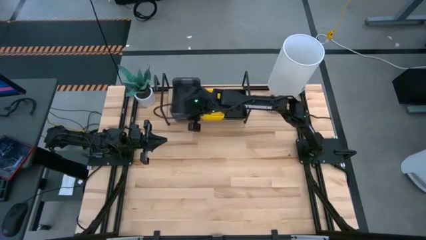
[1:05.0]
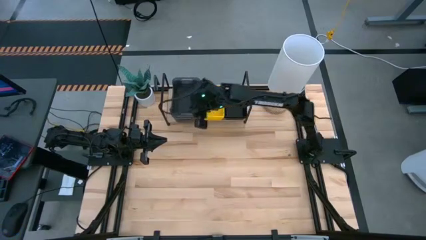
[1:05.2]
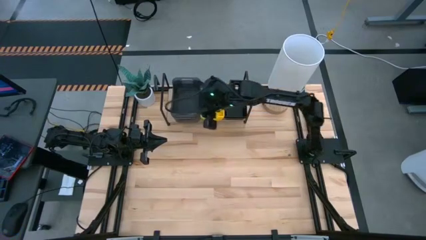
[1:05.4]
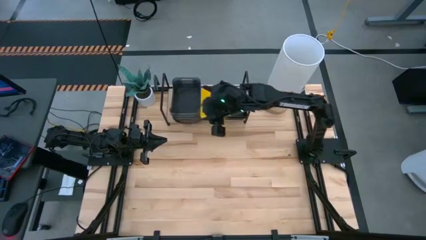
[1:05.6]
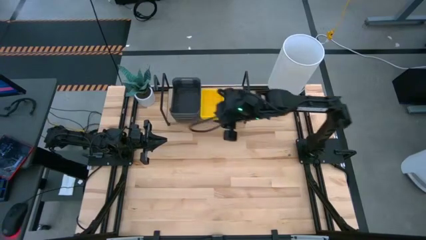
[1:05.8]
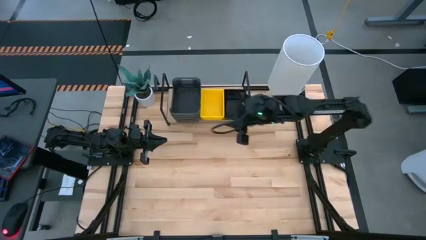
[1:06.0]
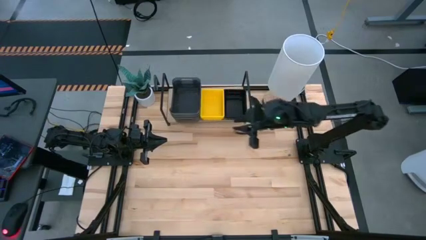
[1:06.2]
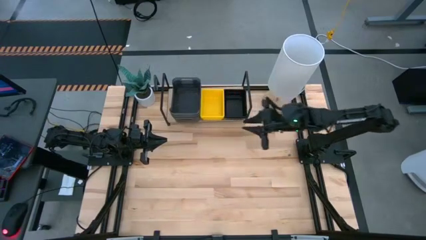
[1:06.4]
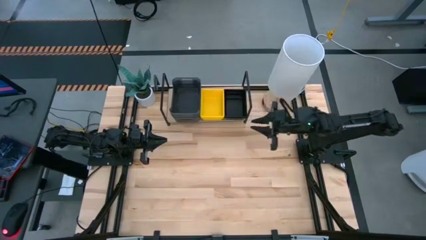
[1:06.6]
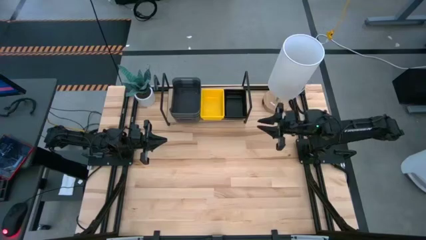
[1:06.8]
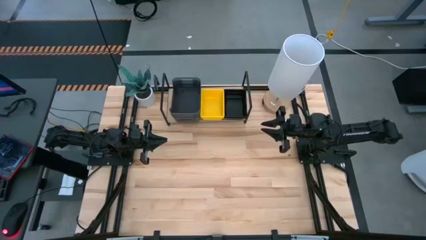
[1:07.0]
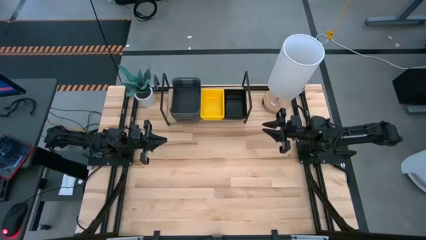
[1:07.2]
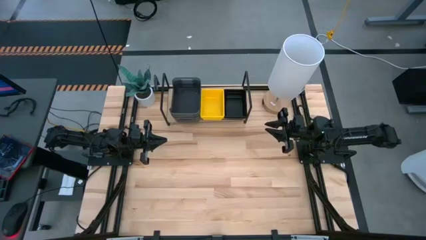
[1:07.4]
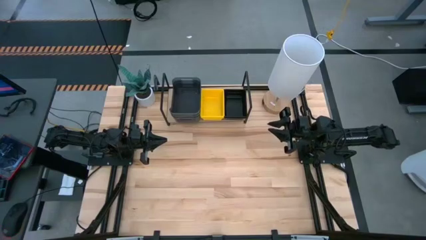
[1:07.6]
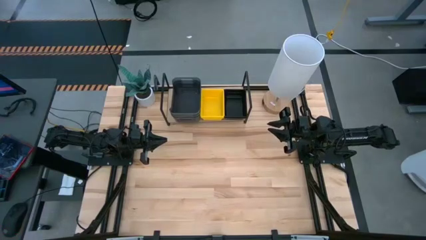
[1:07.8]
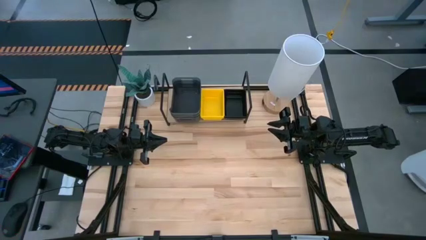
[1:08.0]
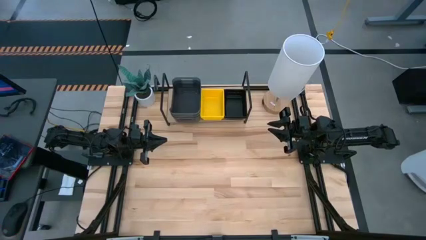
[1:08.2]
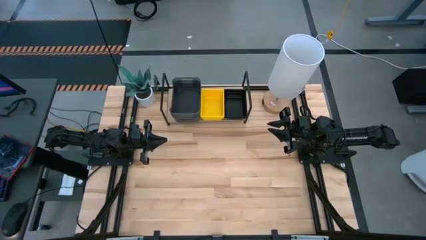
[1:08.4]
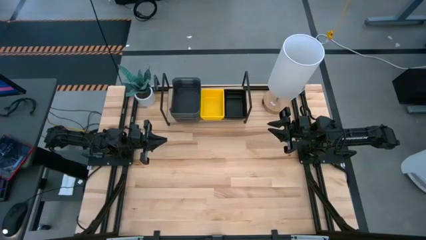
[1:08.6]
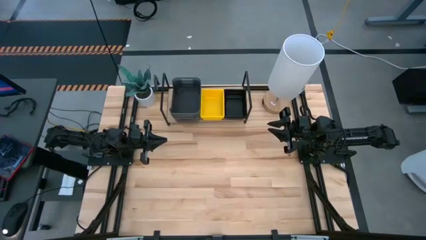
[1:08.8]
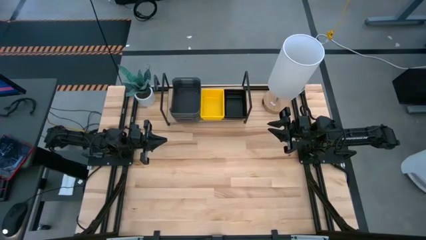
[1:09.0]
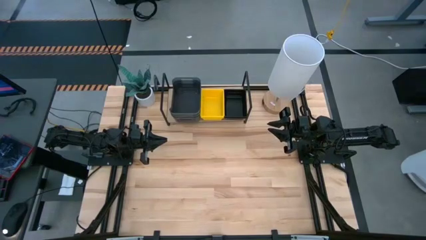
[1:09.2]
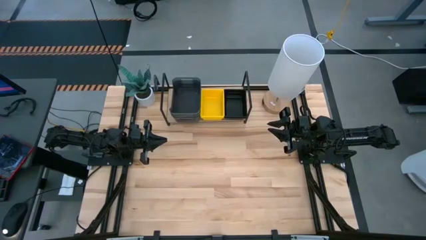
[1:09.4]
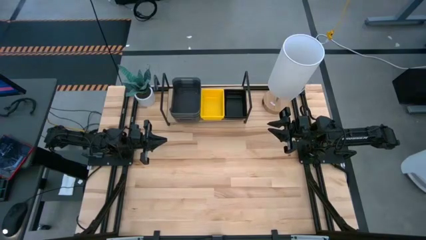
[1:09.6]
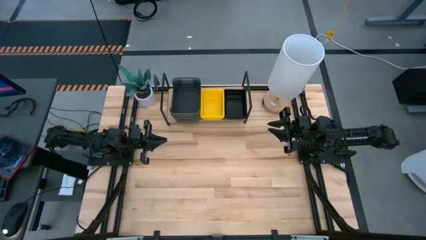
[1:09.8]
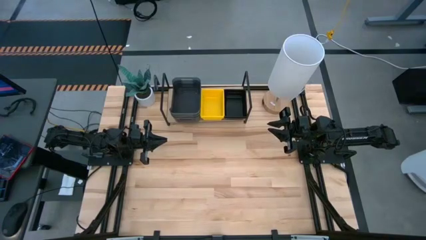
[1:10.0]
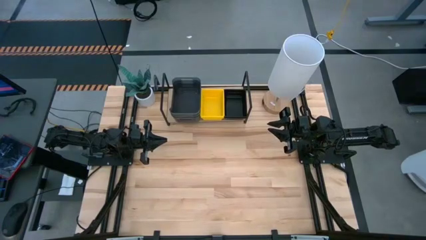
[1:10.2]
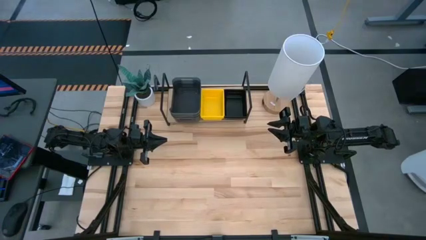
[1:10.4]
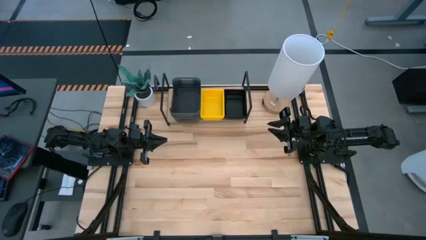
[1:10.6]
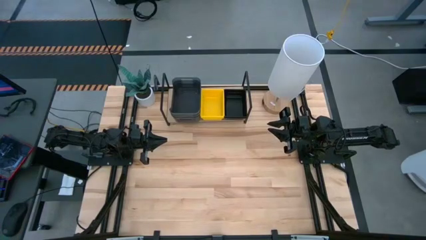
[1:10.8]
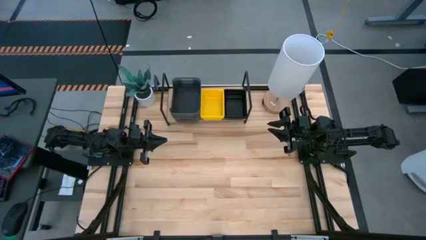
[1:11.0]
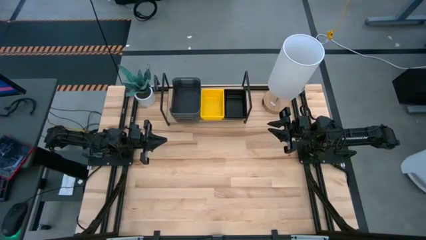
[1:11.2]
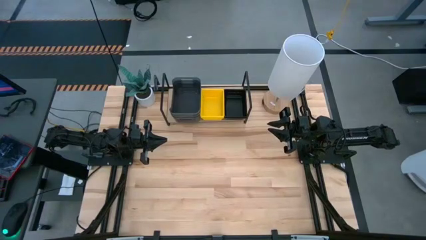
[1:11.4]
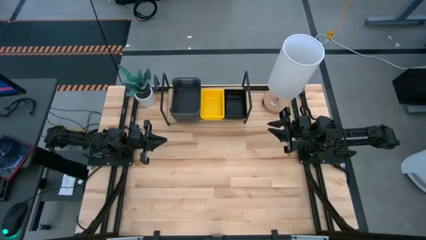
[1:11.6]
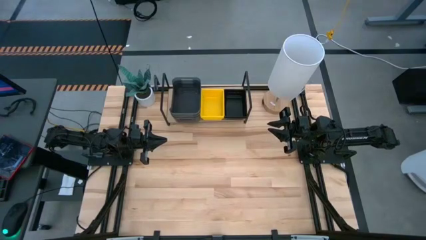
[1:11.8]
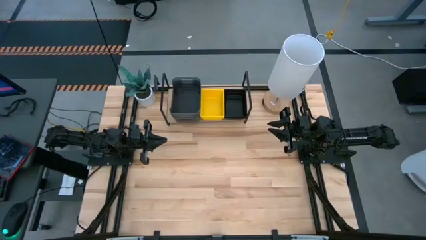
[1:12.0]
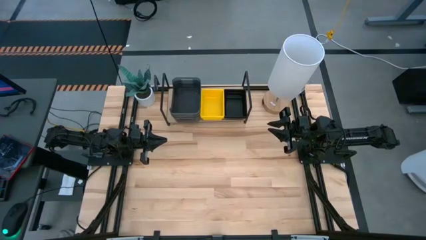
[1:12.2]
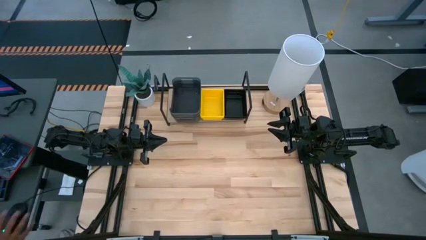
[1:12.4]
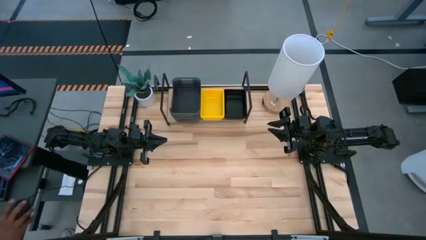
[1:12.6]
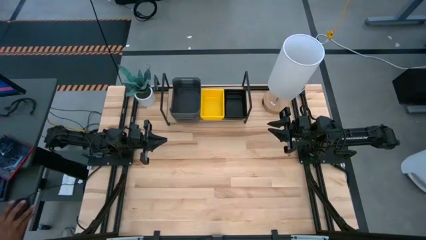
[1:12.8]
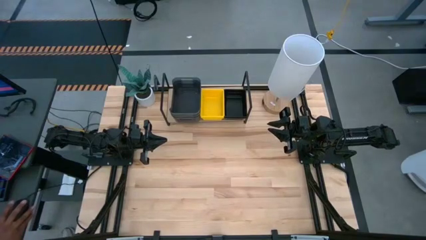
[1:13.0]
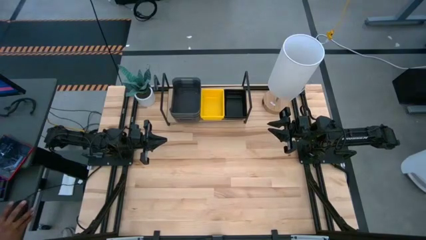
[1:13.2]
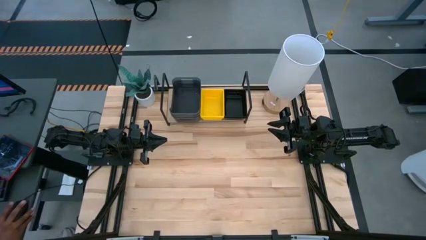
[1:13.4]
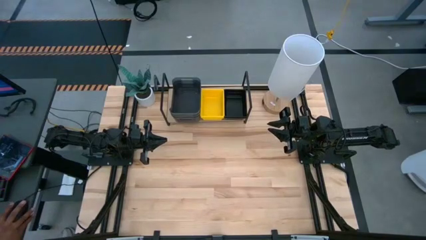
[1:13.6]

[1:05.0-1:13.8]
Task: Stack baskets on shelf by color
Return to Home Position

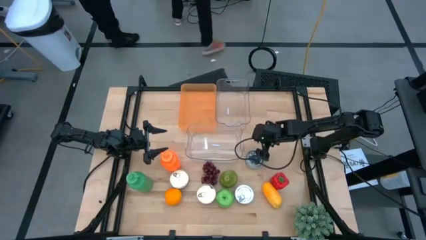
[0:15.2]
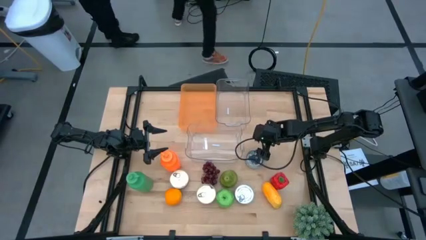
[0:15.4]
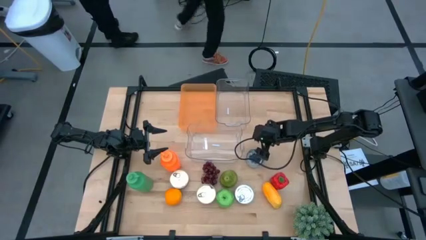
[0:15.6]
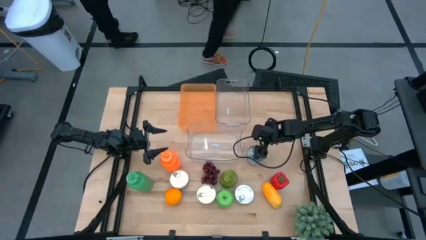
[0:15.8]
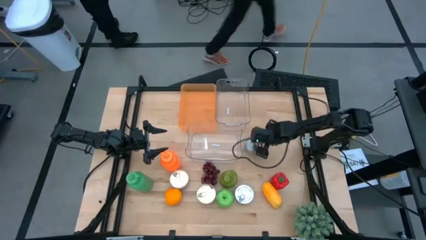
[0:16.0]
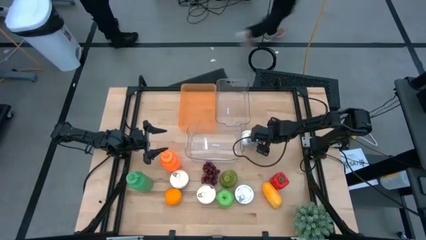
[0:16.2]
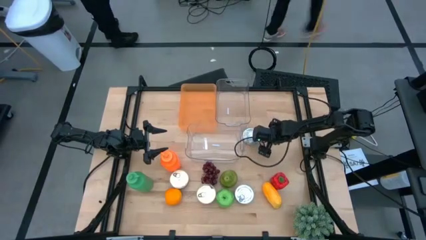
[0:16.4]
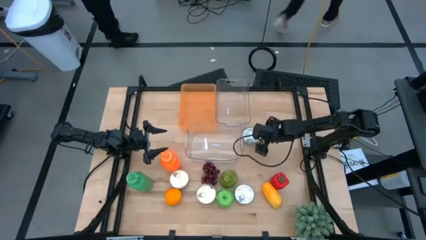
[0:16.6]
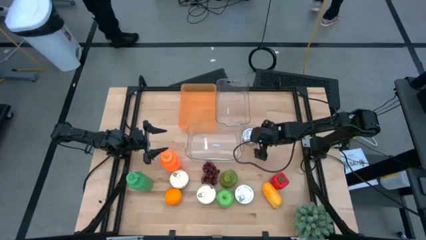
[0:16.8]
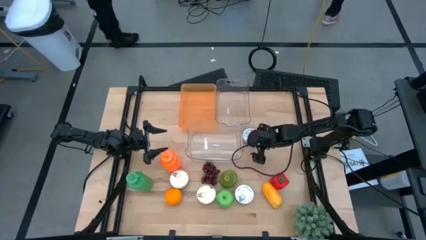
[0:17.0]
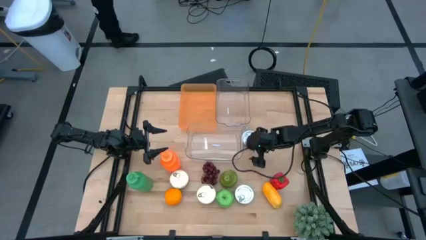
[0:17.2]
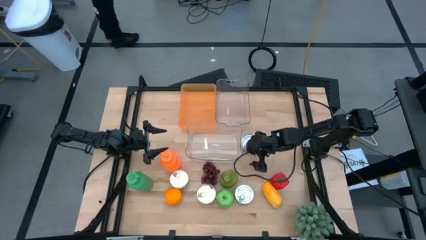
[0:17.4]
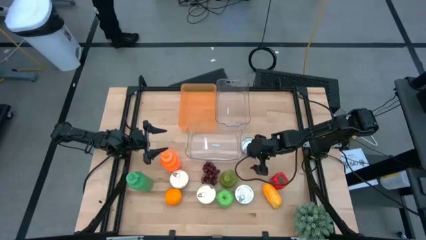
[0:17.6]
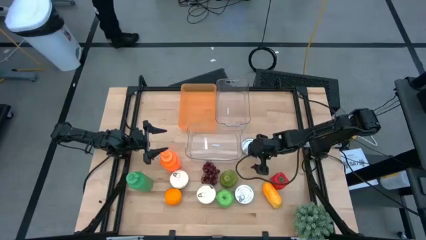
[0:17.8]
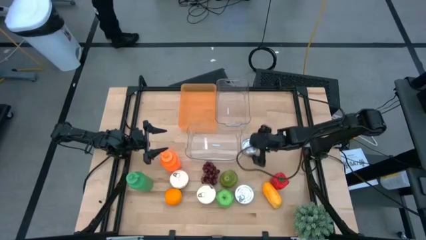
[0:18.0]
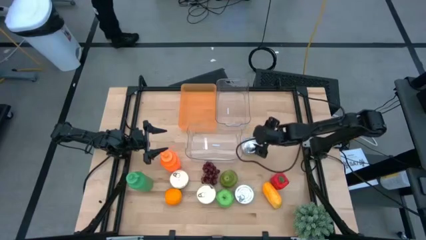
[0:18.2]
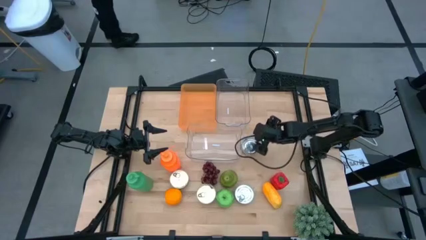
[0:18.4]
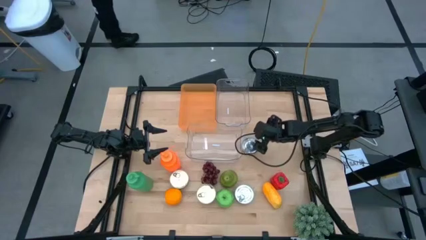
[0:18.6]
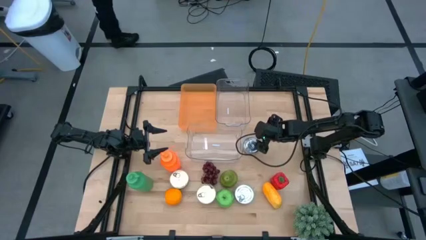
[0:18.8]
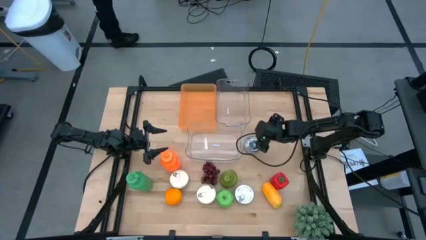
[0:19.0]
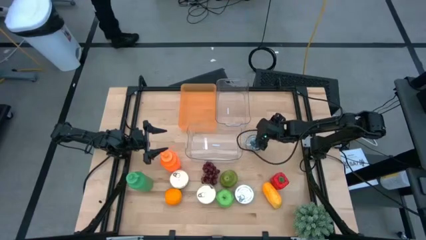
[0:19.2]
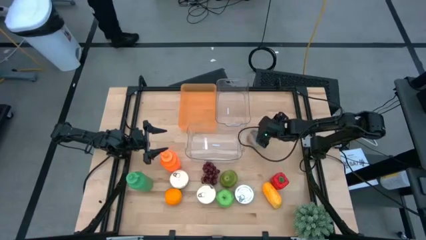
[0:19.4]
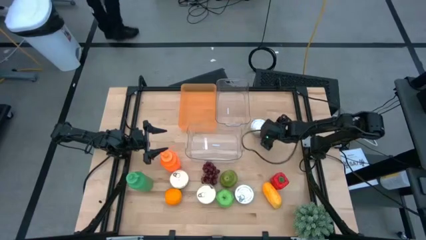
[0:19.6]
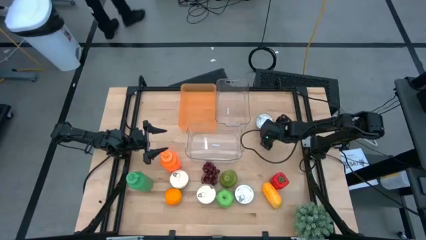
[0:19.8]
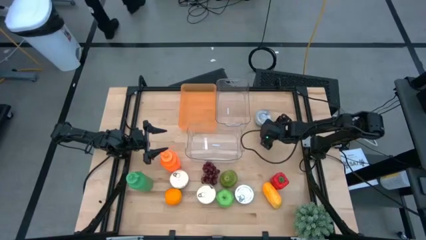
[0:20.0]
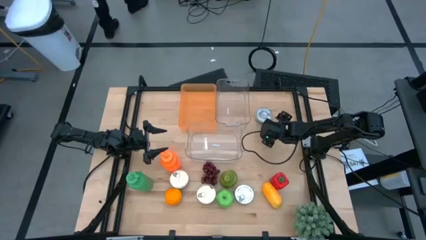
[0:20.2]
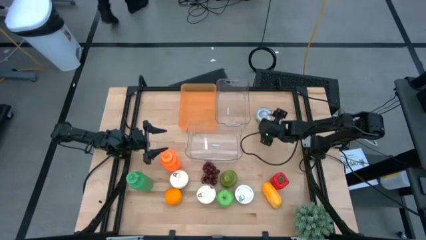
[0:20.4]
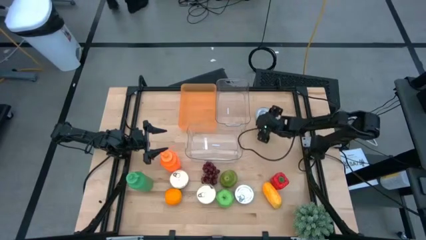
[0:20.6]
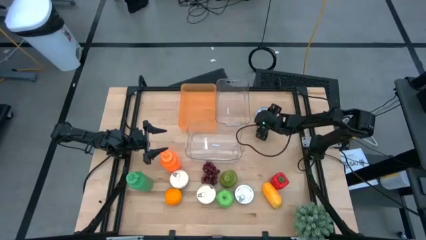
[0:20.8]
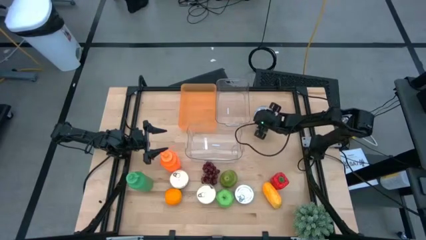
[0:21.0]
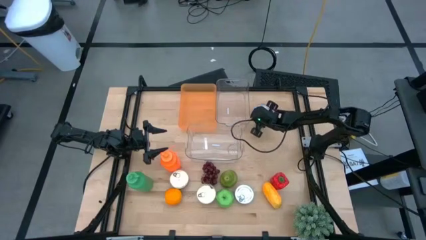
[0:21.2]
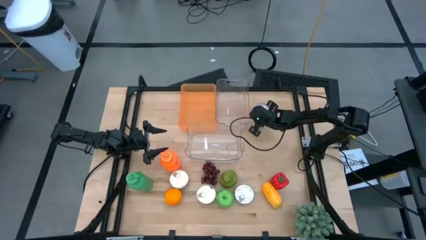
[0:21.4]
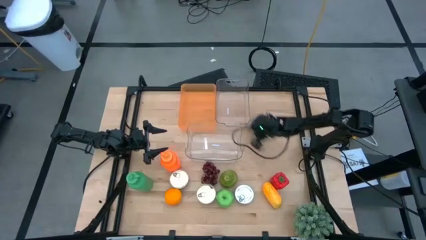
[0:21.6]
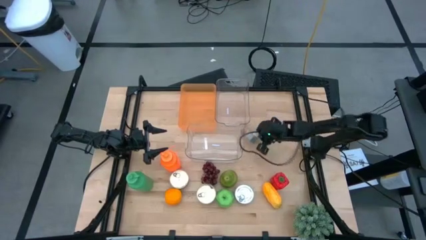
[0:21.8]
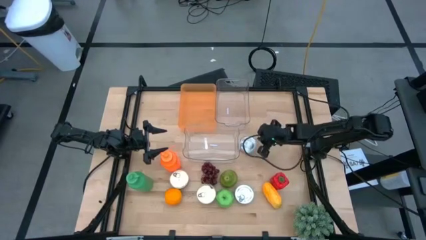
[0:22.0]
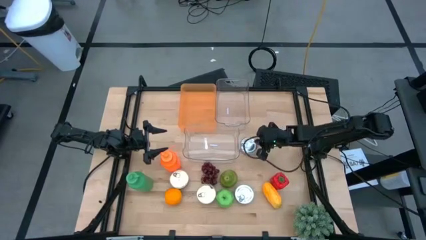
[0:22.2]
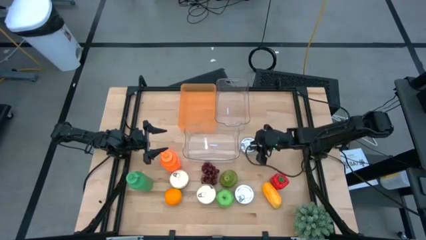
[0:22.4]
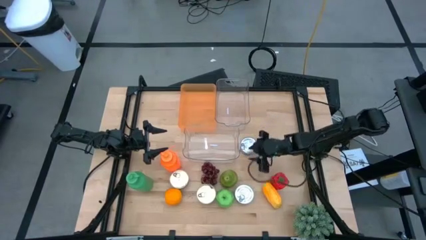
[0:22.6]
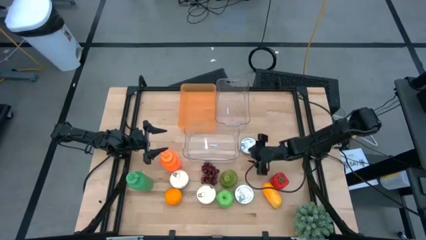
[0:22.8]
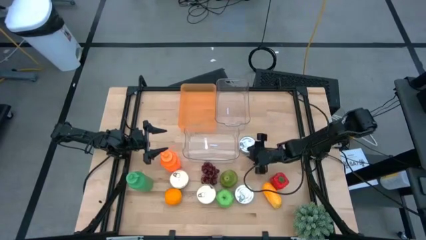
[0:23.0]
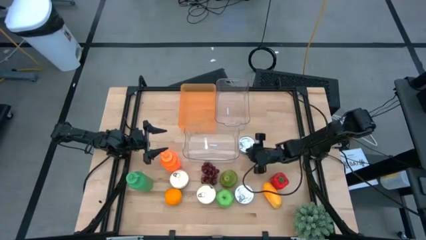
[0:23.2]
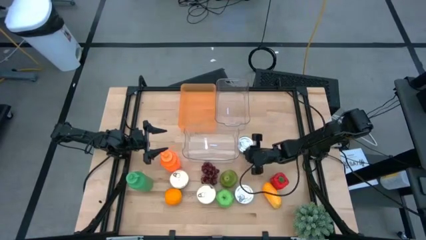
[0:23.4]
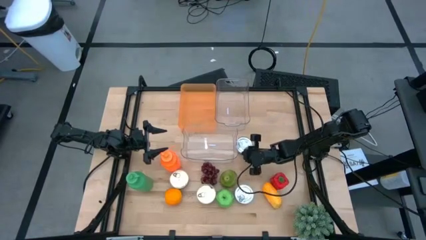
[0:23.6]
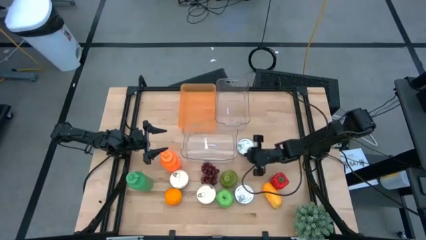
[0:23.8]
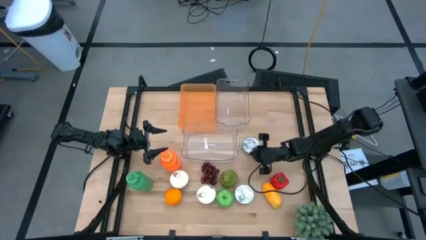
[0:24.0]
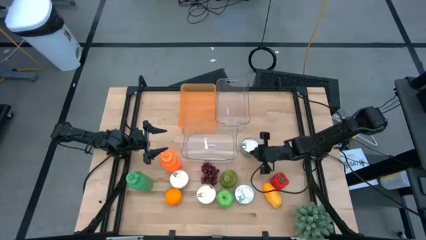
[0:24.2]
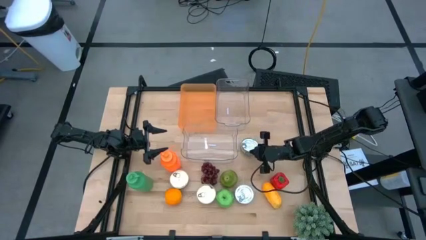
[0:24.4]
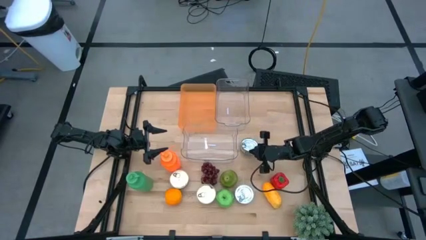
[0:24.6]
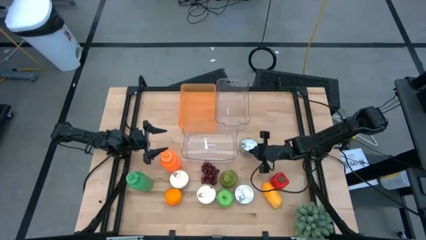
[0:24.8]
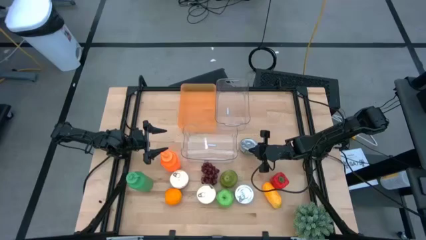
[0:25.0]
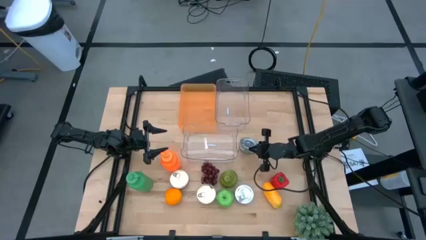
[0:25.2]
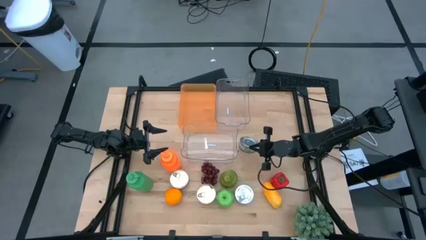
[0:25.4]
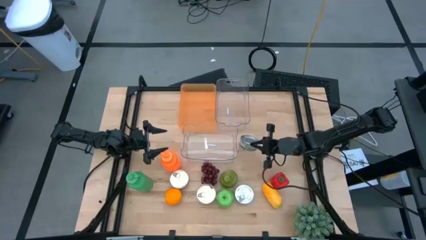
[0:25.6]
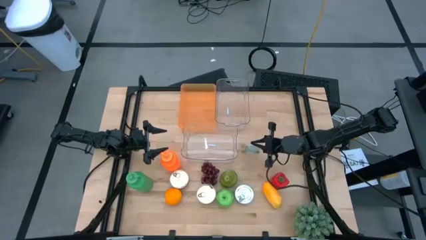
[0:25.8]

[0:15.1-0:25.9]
Task: Pick & Place Food Item
Put the top green tuna can into the bottom transparent bin
